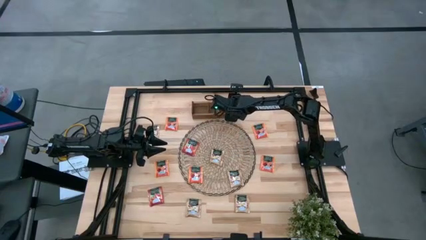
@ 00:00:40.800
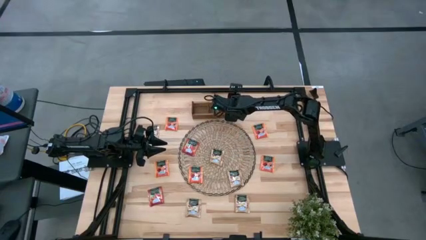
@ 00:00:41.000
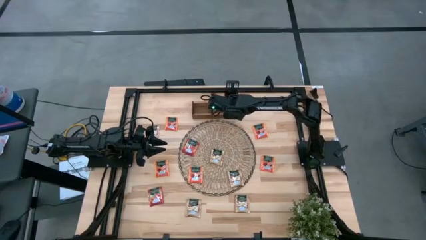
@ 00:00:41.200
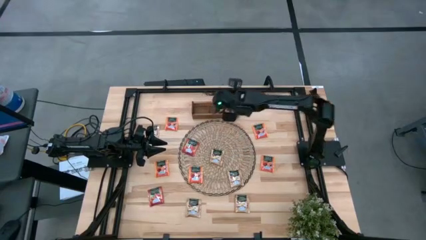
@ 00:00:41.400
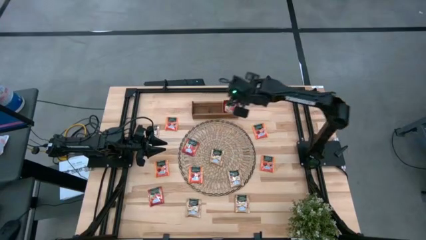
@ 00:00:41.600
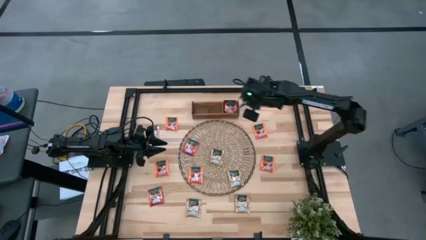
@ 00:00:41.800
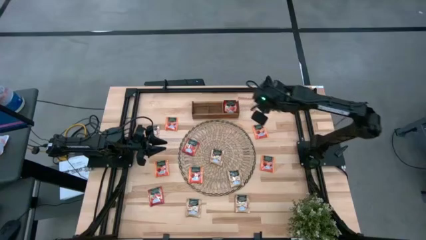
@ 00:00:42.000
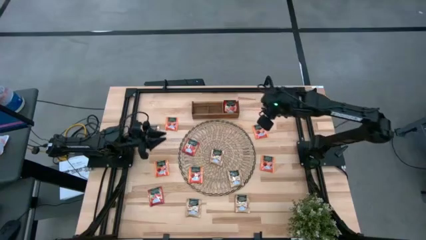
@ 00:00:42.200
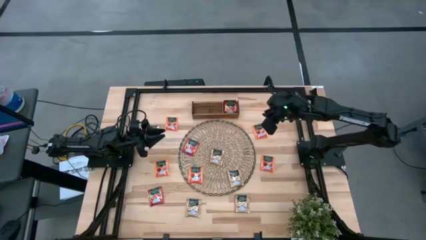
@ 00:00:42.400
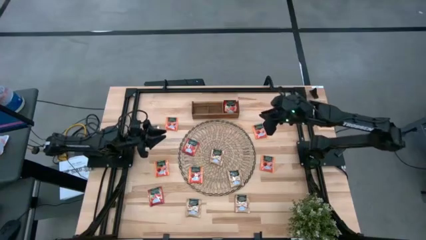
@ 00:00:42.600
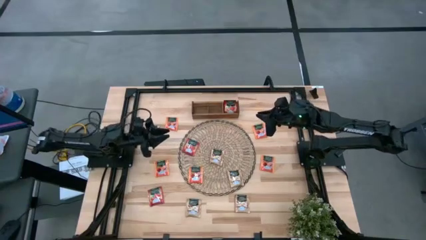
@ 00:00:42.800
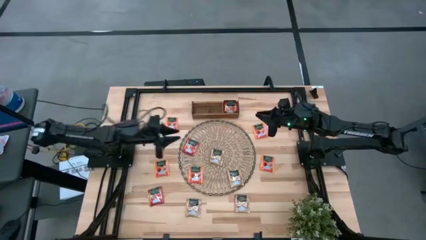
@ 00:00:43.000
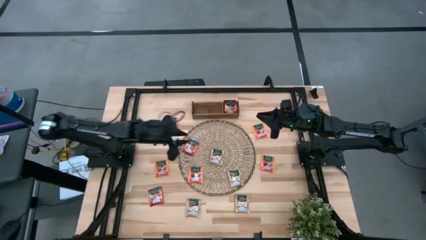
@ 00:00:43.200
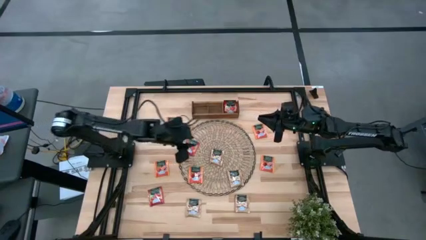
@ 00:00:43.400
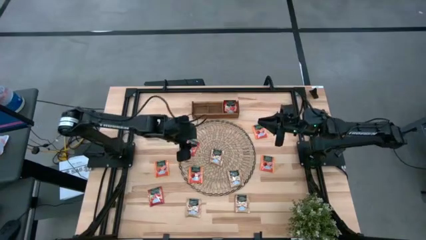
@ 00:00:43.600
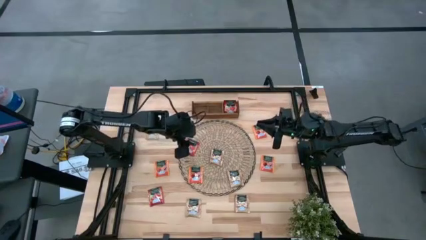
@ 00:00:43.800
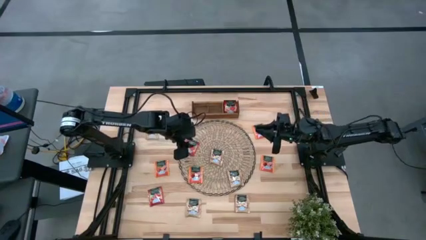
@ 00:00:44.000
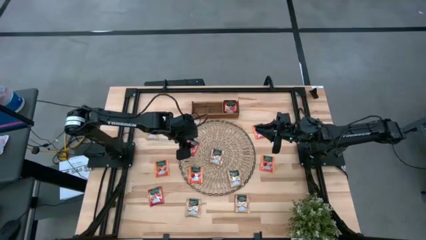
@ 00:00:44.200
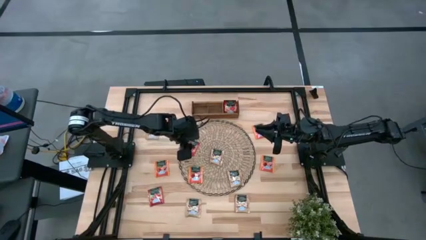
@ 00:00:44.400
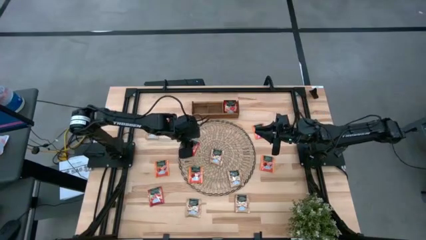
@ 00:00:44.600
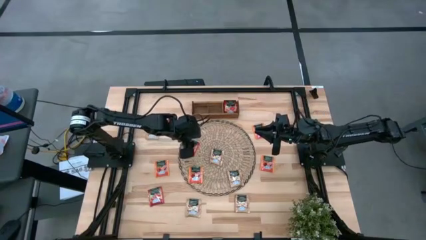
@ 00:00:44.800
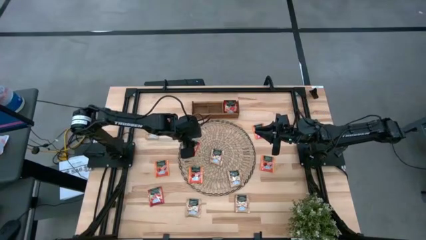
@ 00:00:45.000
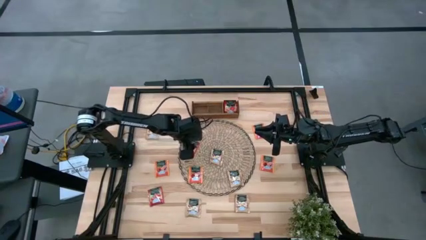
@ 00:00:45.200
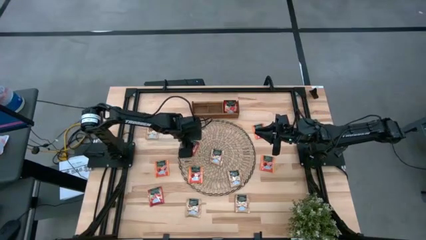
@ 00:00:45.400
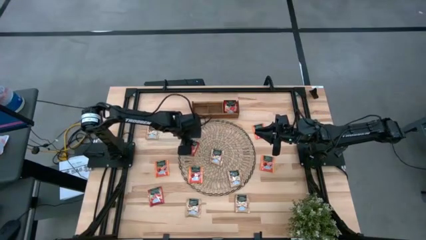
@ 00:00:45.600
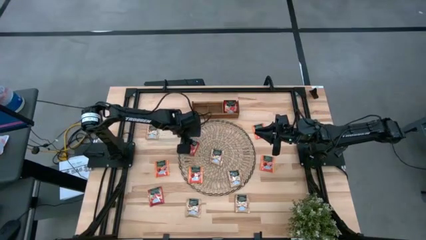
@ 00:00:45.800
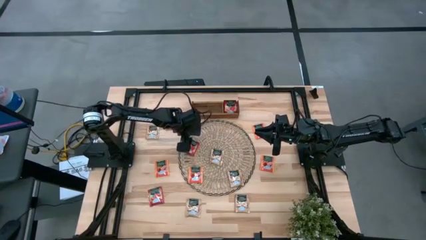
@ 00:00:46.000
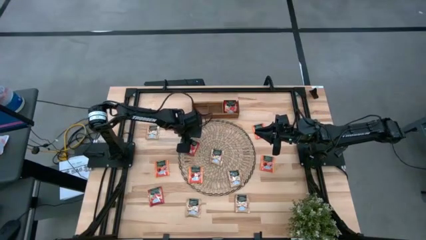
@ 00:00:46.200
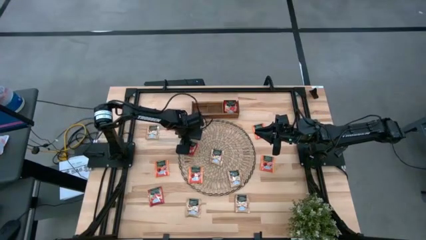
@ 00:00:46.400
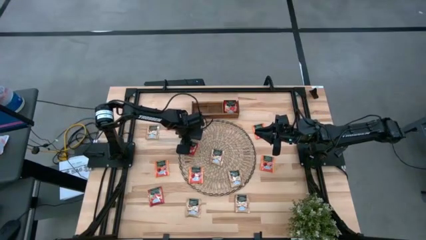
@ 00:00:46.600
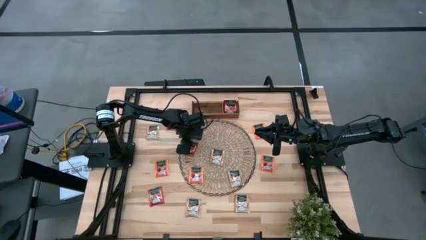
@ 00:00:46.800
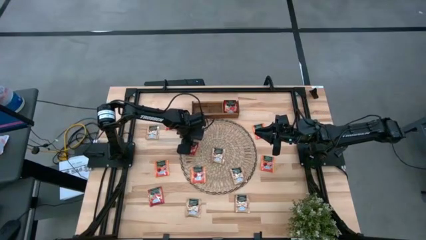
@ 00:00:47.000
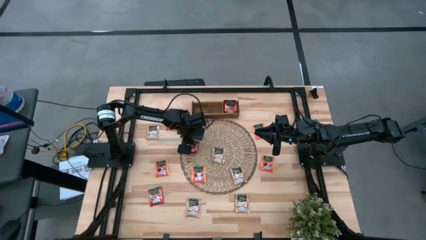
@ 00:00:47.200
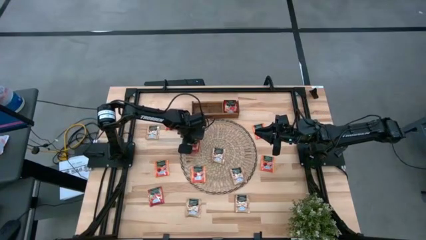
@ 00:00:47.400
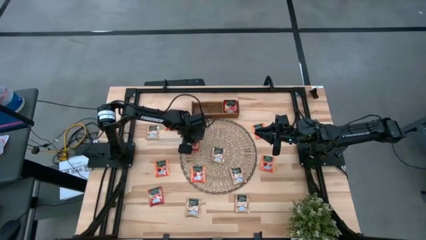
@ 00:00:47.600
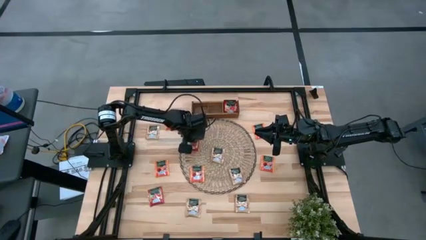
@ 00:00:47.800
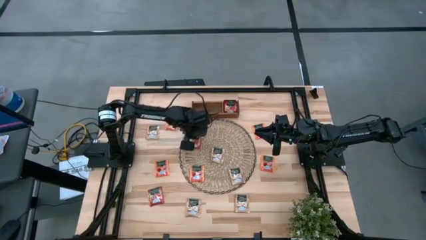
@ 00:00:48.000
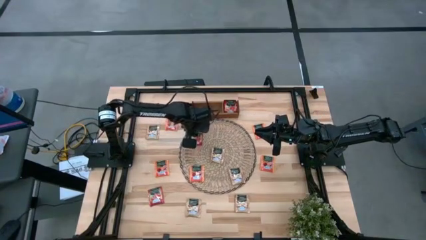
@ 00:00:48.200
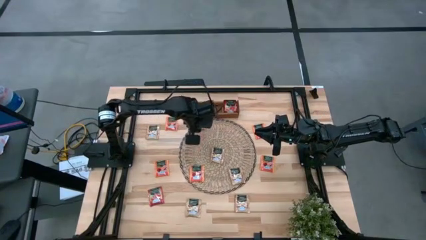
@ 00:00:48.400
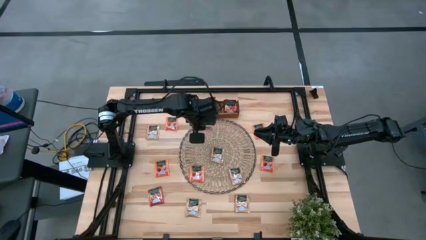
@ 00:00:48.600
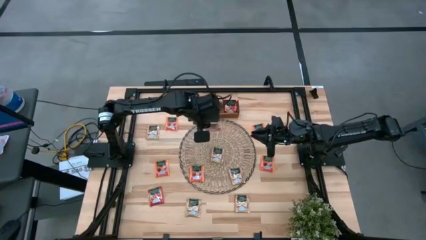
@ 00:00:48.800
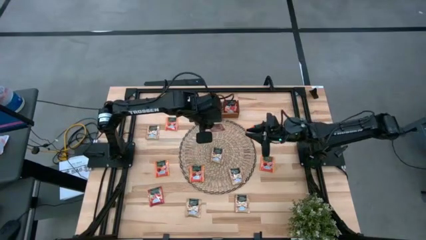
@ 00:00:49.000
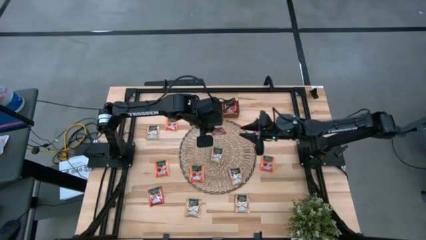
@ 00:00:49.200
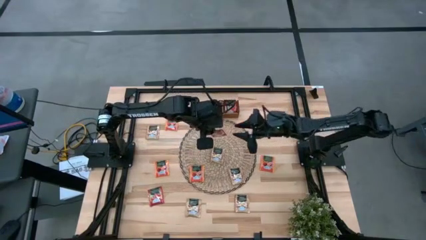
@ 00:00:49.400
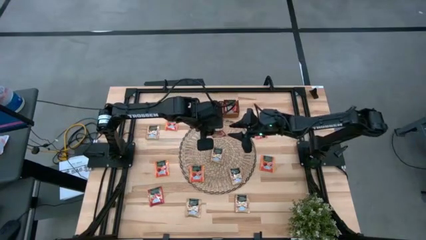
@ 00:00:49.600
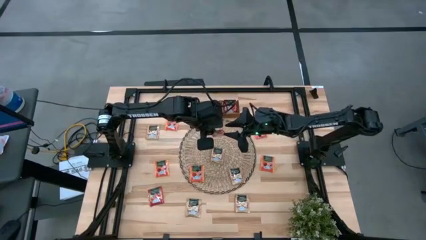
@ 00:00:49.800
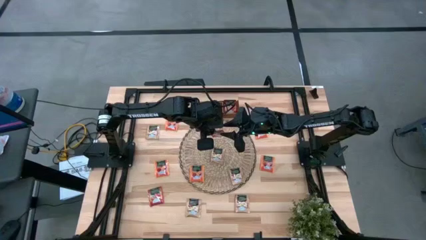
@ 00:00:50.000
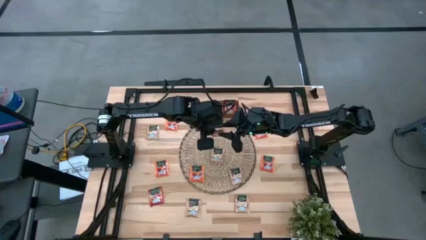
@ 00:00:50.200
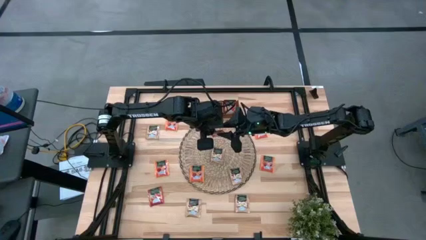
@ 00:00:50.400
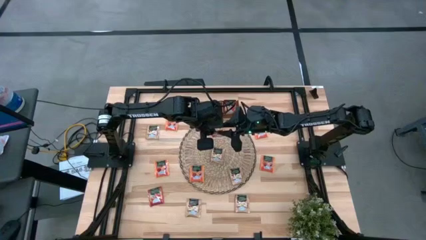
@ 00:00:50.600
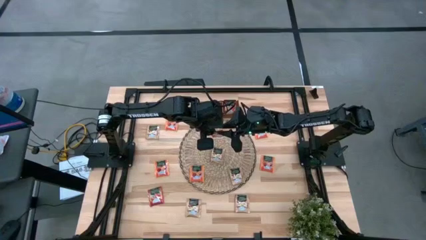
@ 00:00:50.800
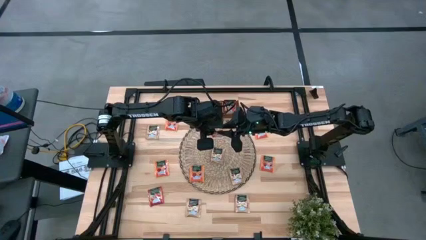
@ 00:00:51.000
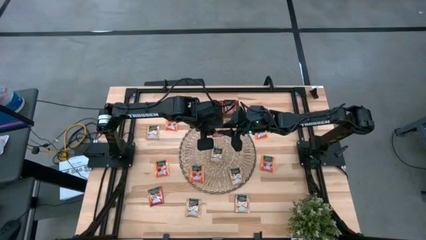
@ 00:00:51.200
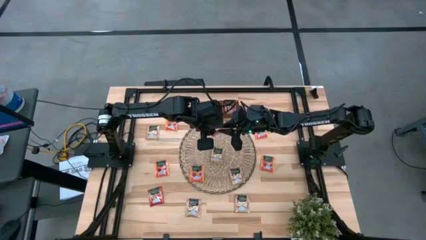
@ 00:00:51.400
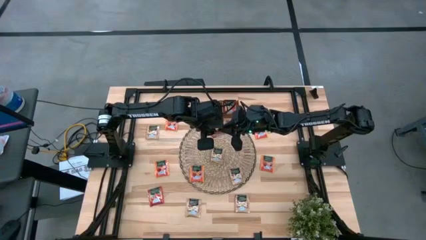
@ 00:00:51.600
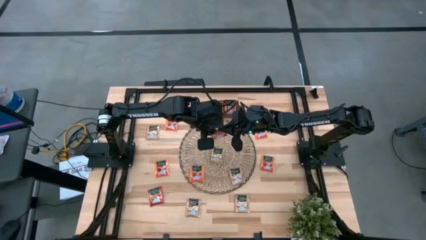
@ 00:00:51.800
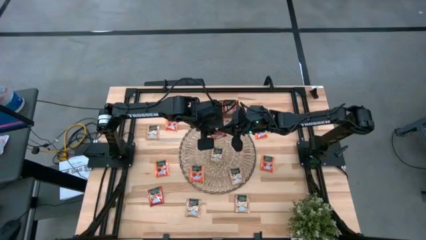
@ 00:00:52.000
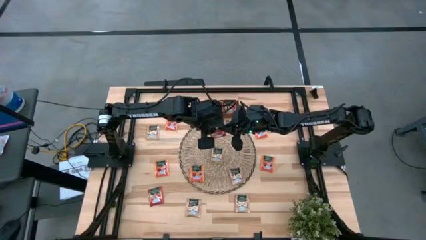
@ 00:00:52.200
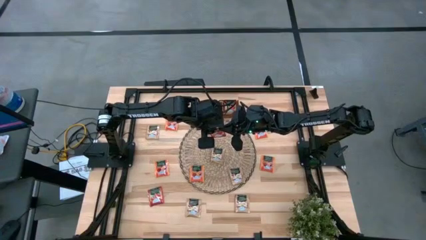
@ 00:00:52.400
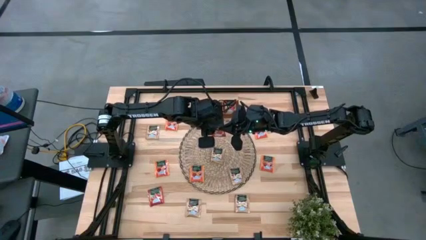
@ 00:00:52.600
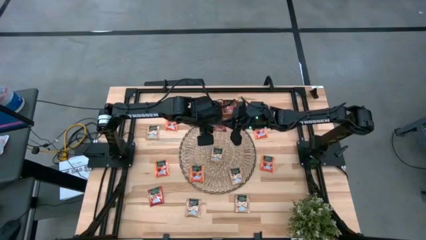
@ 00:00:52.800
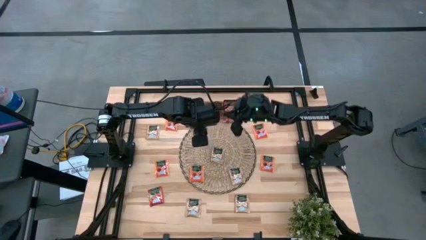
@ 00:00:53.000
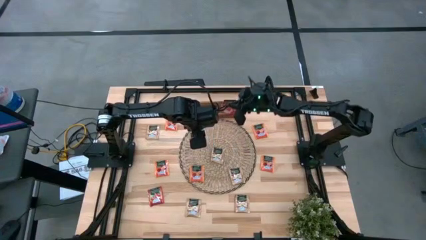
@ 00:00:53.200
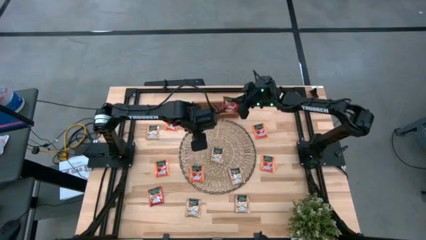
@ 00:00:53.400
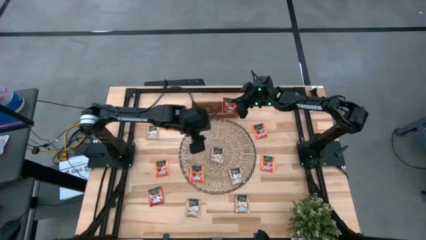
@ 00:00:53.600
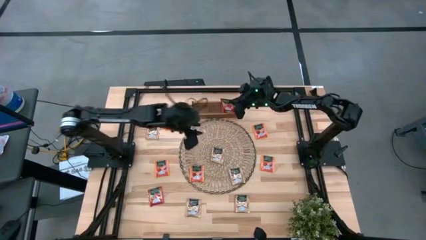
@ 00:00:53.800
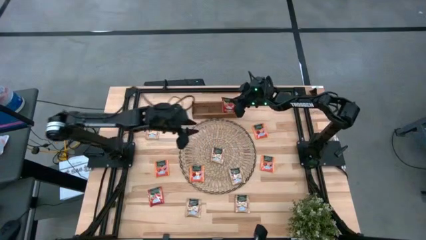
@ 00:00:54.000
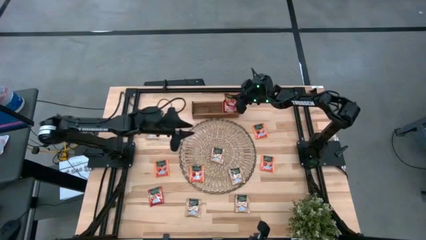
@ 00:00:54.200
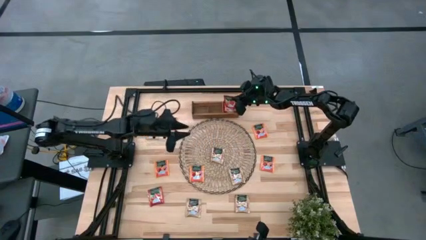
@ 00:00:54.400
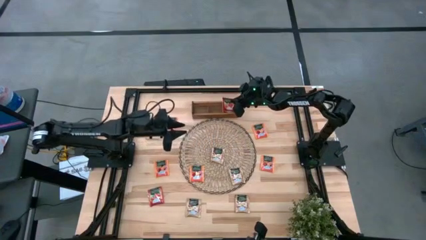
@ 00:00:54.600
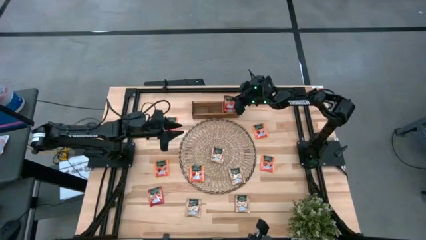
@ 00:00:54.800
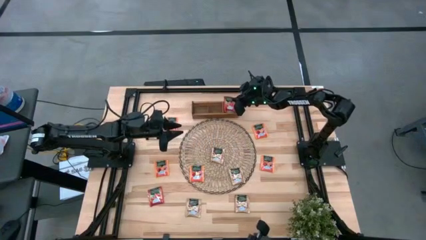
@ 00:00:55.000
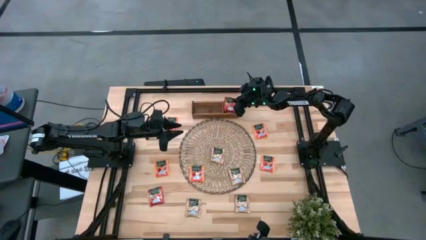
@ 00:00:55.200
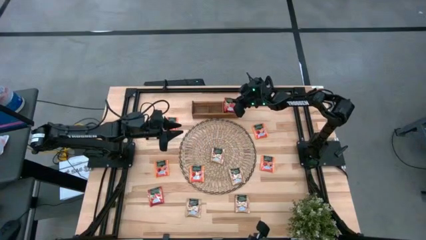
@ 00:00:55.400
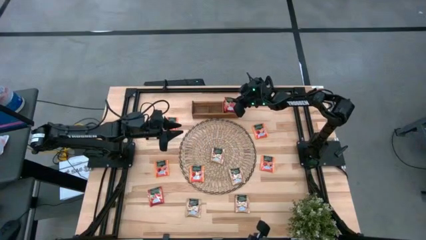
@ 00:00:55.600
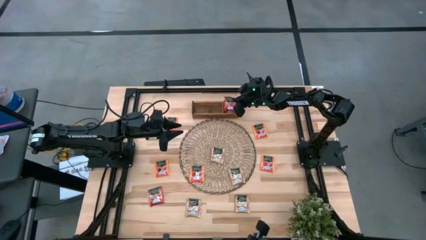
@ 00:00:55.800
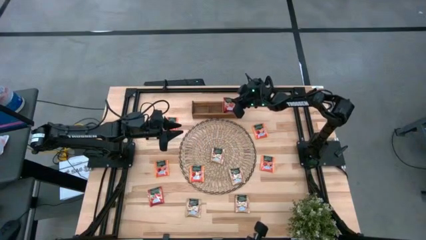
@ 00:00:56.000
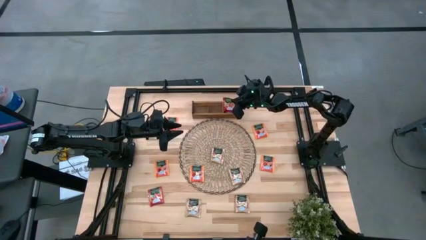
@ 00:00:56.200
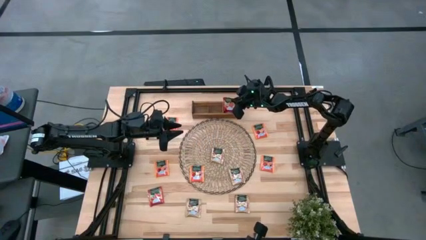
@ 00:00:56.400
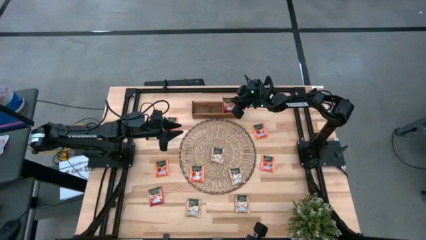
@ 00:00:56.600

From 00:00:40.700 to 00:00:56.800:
Task: Pick & Place Tea
Put the red tea bag into the right section of the wooden organizer
